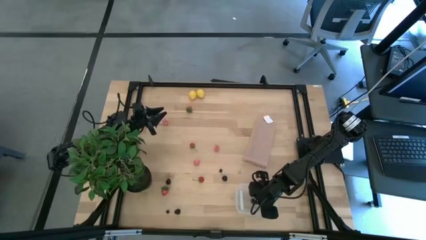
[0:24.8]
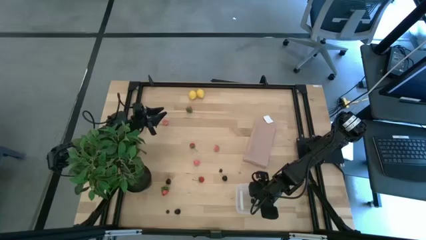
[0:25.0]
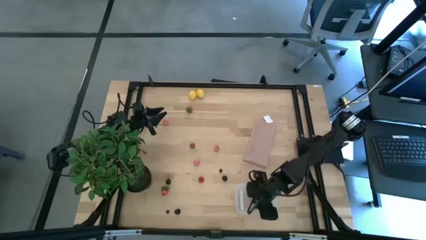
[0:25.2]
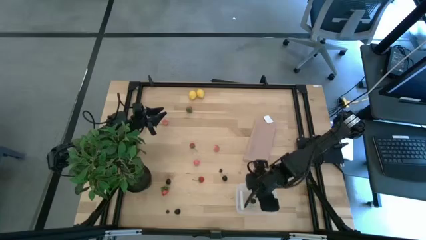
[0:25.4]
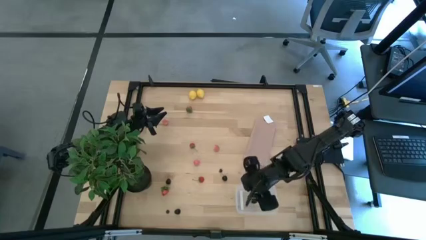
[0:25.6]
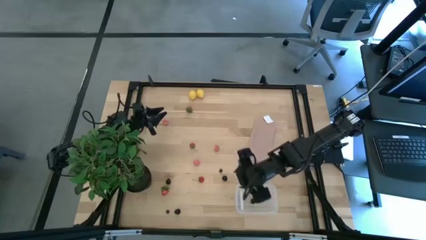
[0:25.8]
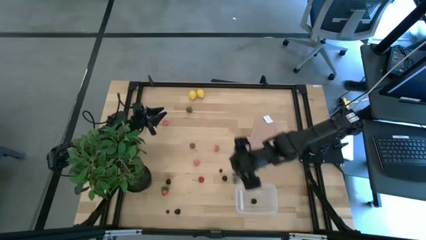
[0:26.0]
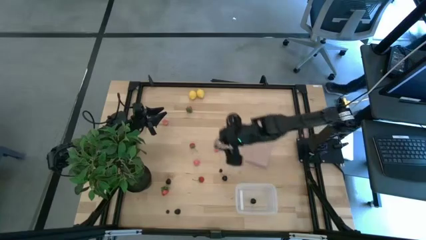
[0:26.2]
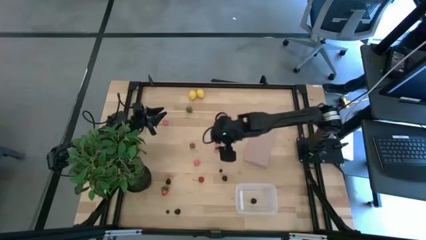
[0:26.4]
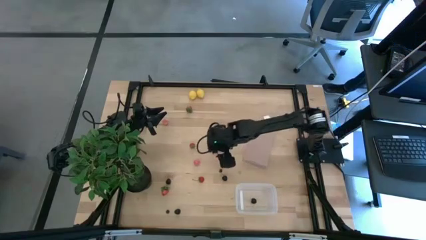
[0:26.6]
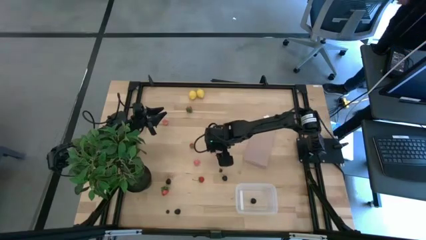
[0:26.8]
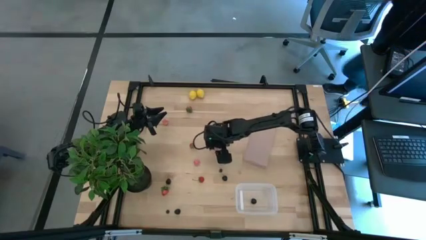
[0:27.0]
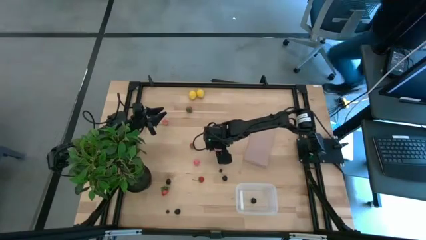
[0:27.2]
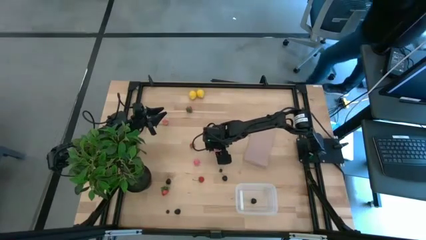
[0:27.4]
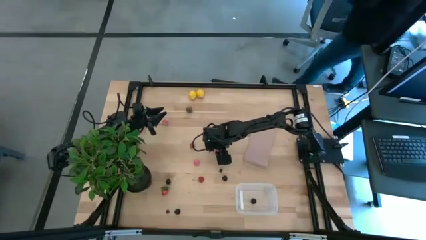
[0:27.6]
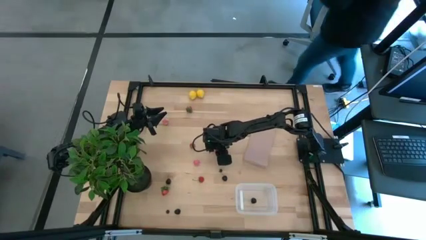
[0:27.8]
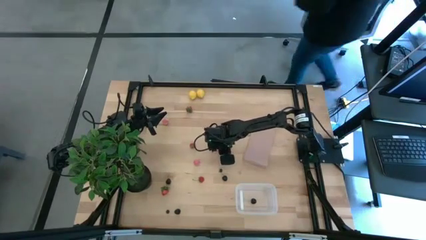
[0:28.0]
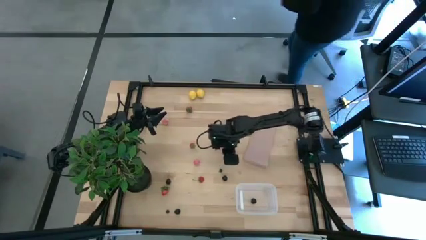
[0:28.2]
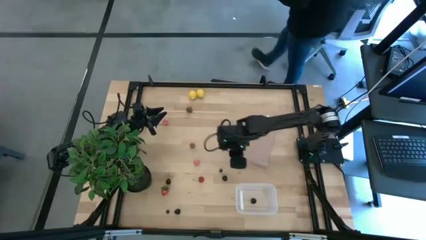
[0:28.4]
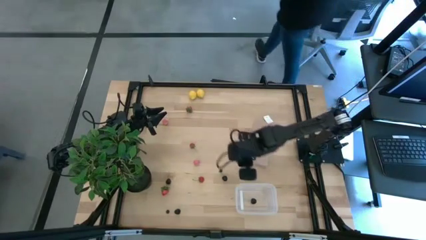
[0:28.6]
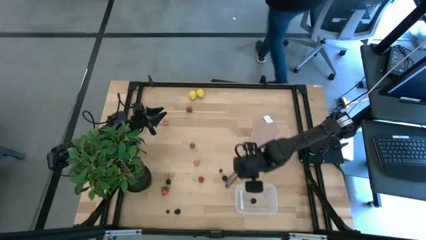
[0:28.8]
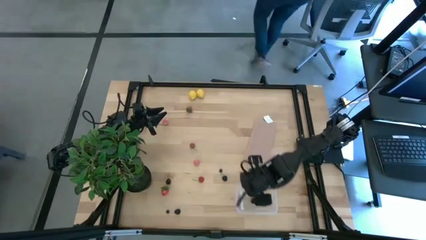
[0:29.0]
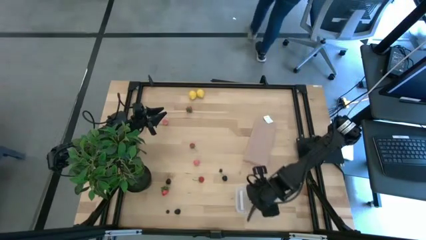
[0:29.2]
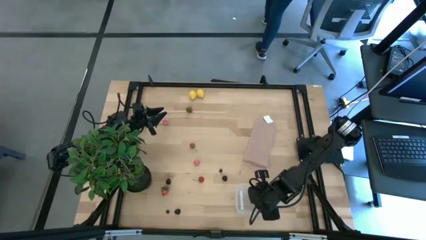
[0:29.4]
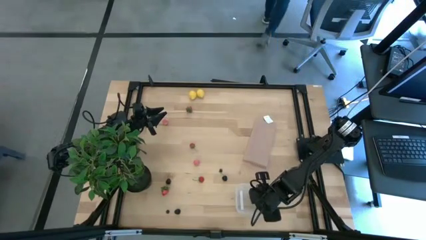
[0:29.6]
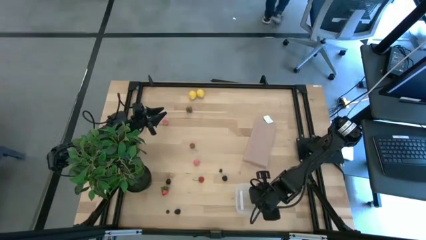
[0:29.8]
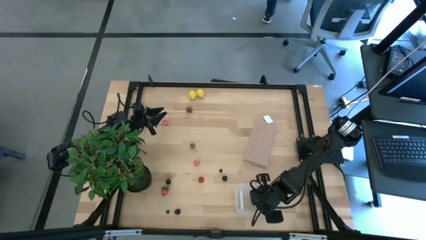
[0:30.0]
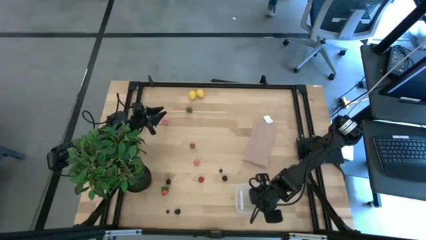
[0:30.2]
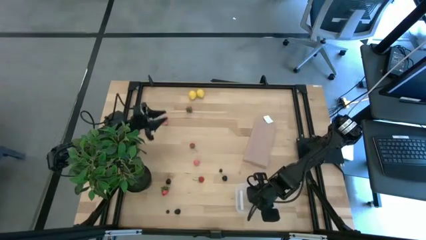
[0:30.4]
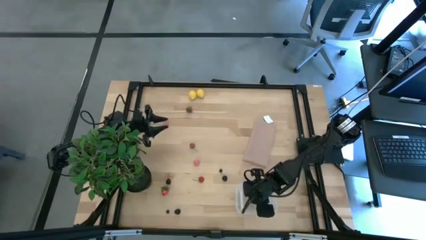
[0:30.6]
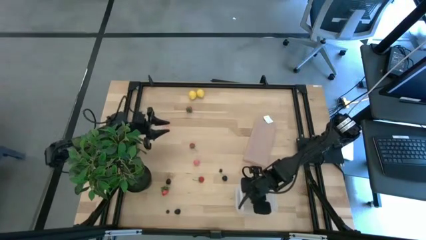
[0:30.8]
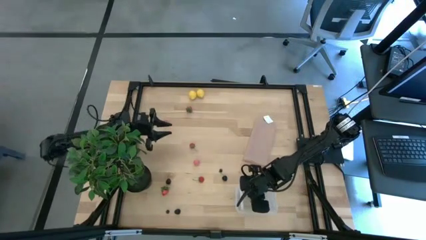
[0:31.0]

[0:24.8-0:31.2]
Task: Pick and placing Produce into tupperware
Put the peach into the transparent container

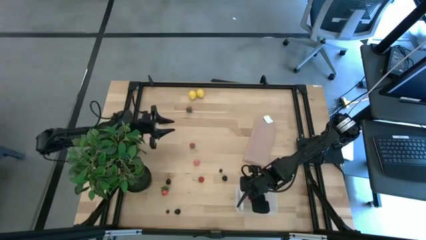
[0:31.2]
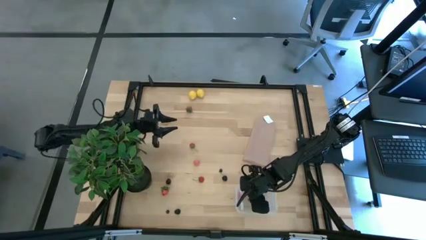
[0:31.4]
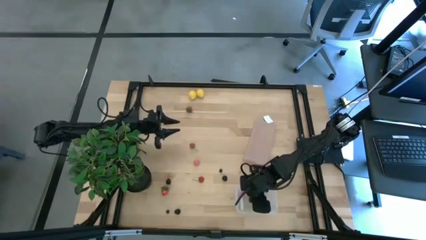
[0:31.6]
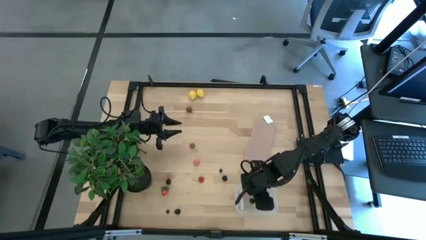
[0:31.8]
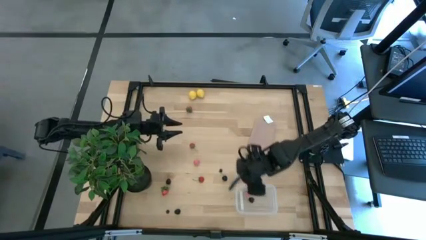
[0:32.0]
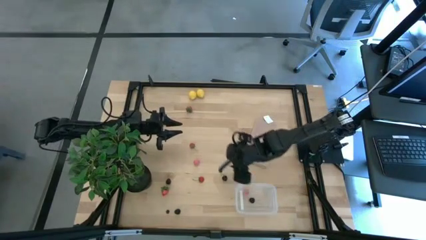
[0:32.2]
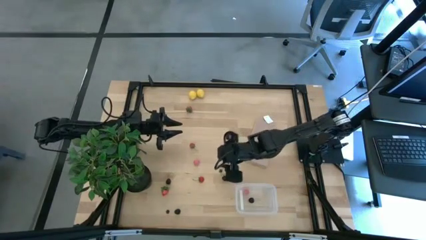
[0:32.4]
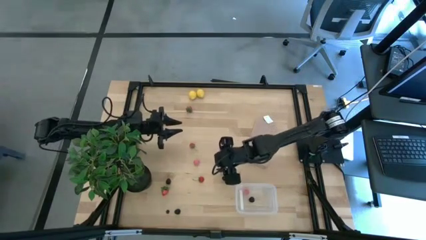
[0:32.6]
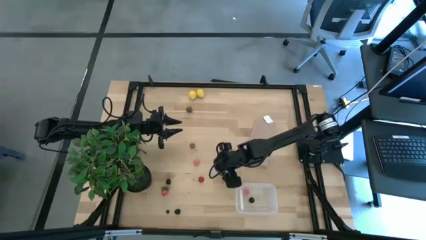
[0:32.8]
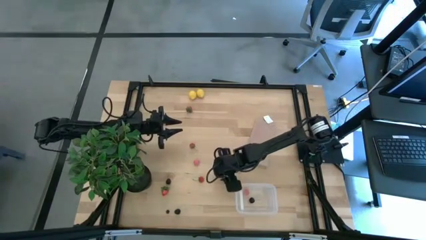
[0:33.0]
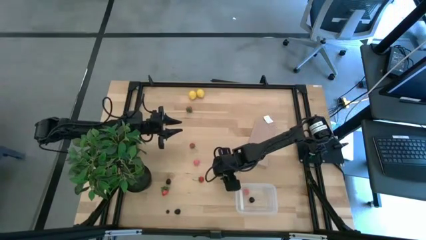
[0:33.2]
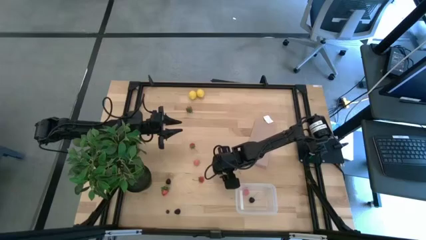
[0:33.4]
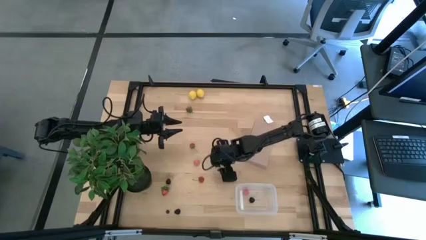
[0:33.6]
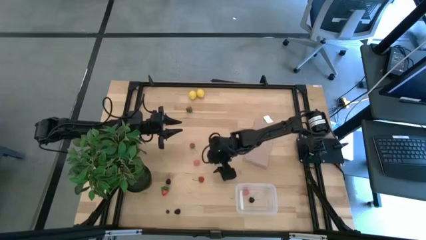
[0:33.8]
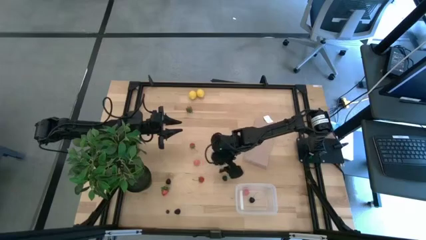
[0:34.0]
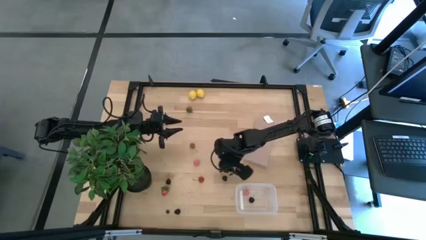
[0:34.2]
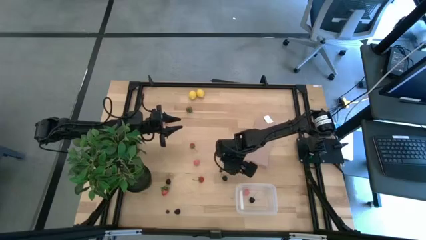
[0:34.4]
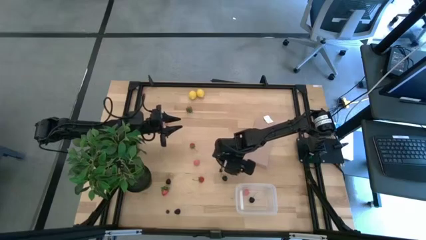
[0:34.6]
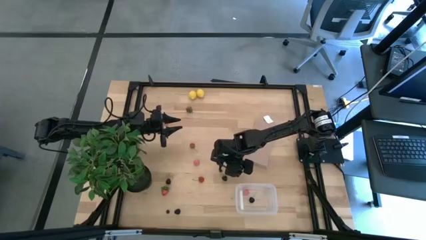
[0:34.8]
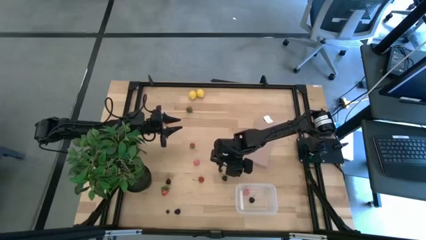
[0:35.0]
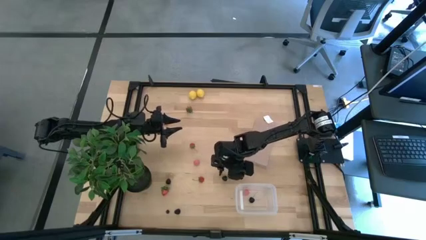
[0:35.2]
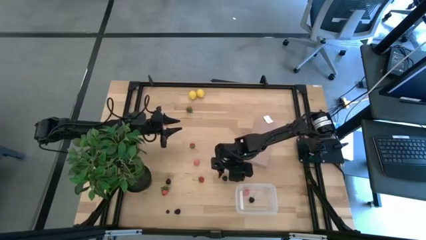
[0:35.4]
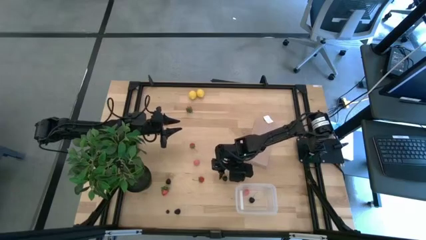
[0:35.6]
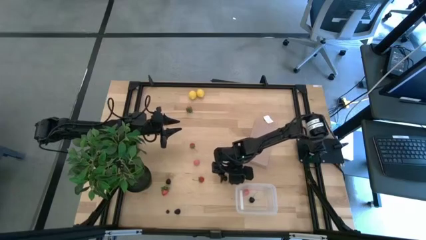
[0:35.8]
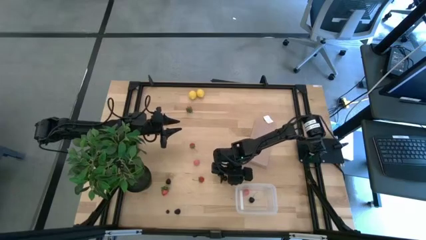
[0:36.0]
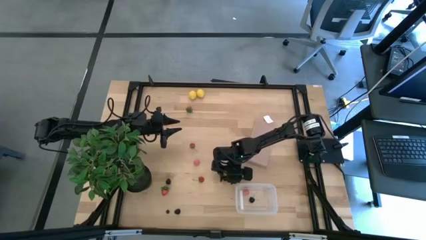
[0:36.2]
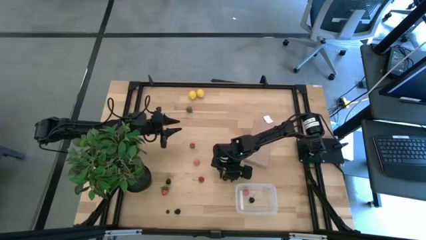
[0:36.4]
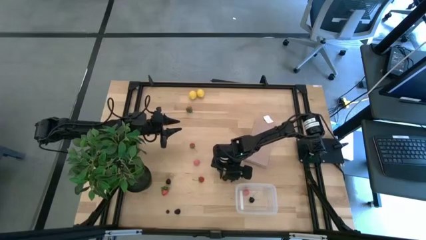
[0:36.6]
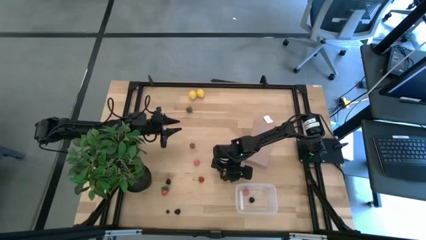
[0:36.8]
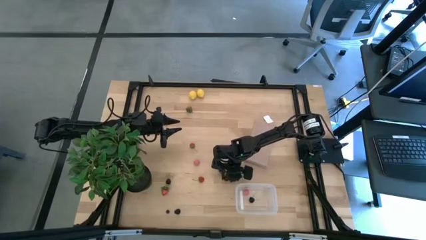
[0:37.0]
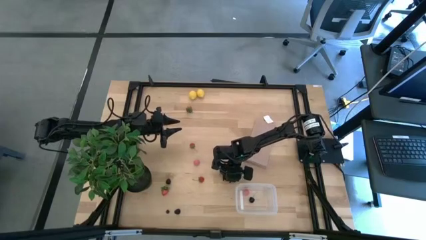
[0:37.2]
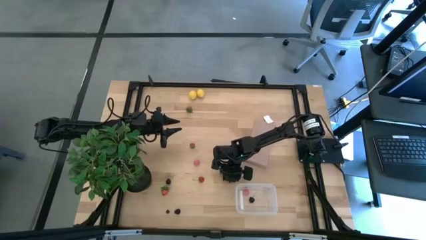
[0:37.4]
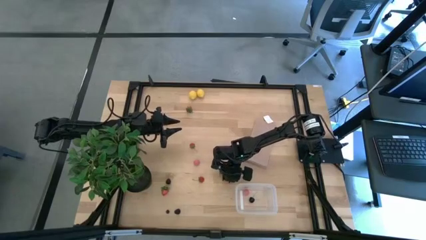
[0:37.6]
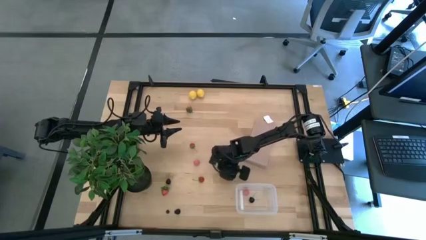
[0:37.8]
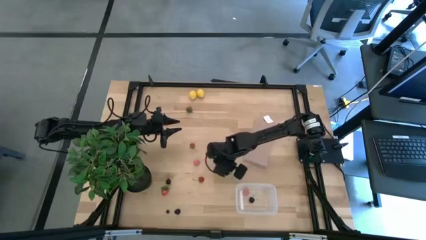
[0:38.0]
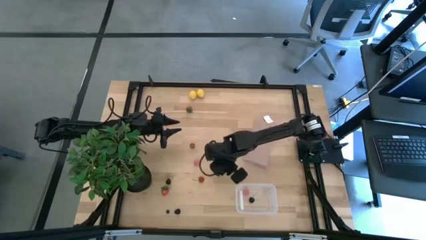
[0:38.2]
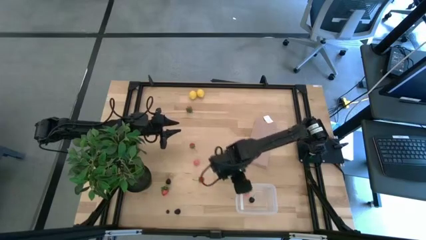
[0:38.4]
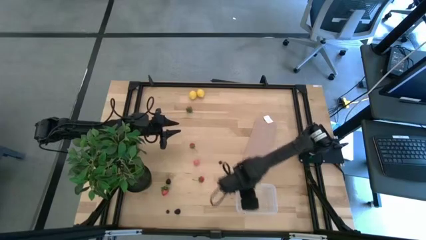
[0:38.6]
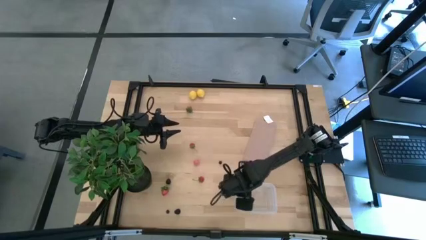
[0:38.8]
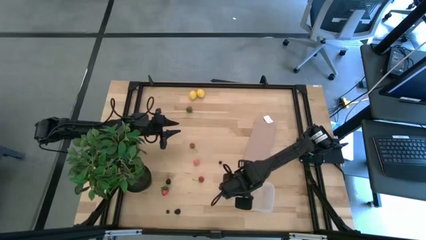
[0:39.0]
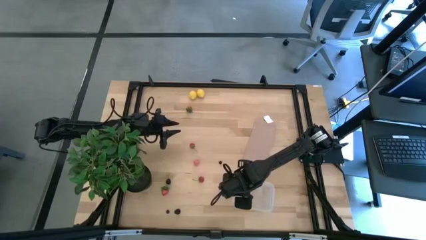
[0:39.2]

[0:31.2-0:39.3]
Put the cherry into the transparent container

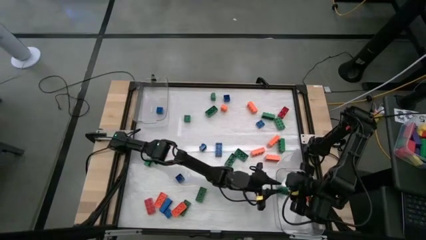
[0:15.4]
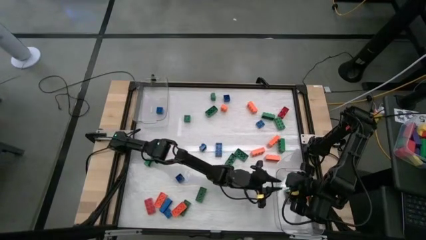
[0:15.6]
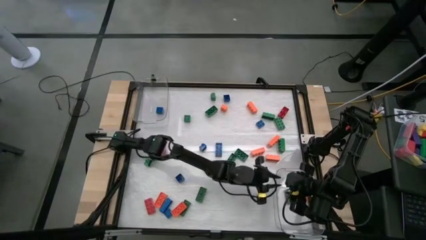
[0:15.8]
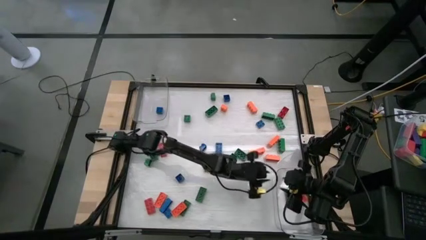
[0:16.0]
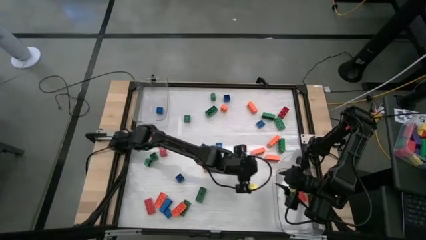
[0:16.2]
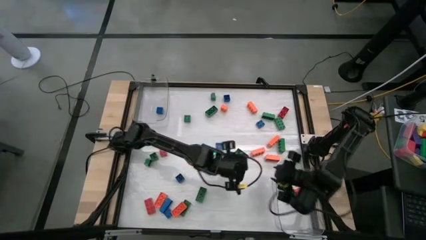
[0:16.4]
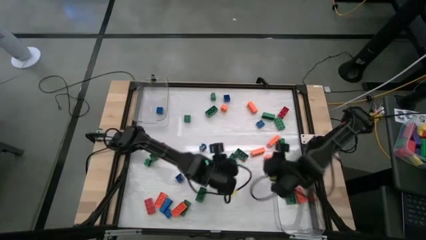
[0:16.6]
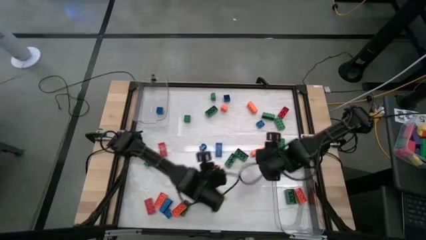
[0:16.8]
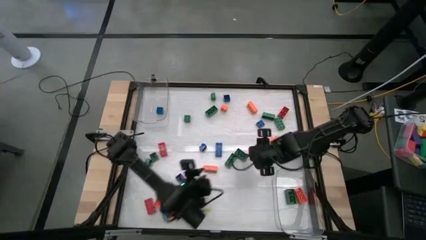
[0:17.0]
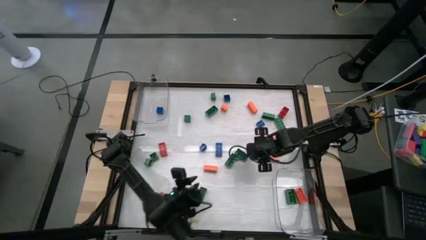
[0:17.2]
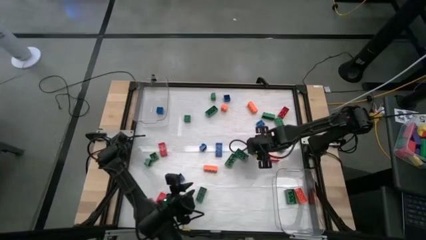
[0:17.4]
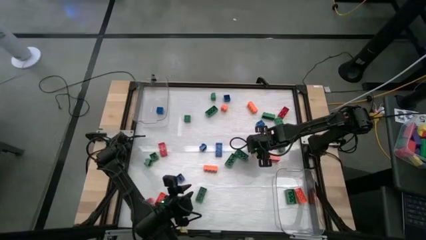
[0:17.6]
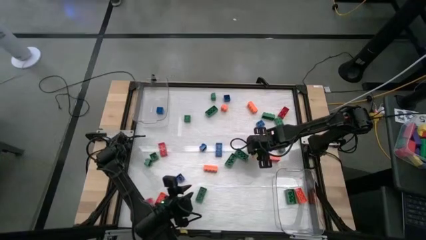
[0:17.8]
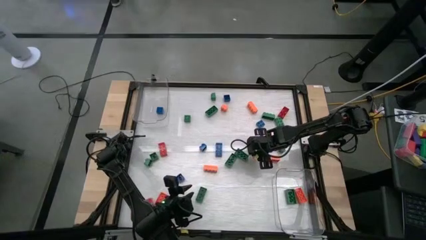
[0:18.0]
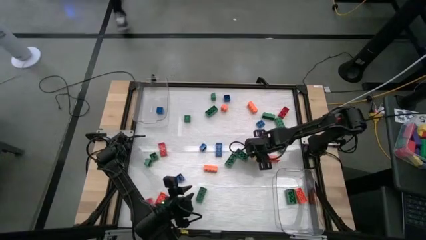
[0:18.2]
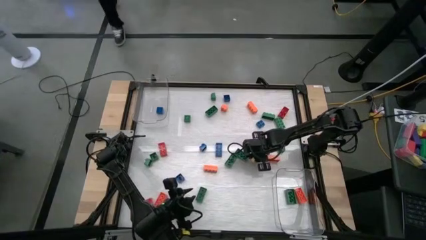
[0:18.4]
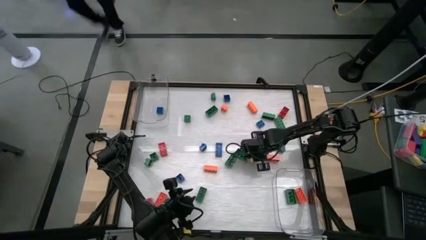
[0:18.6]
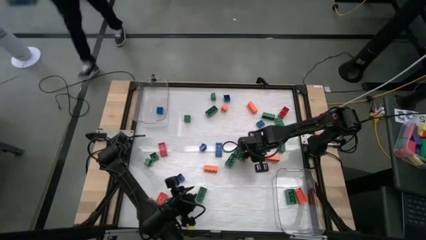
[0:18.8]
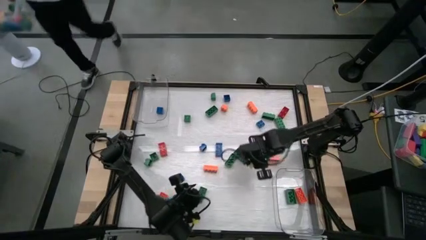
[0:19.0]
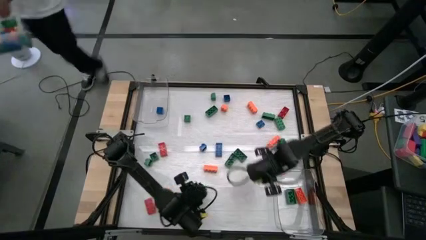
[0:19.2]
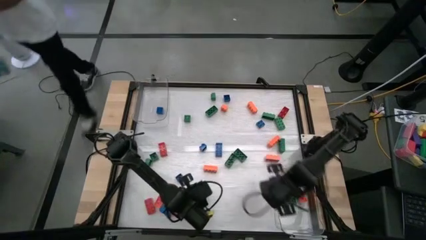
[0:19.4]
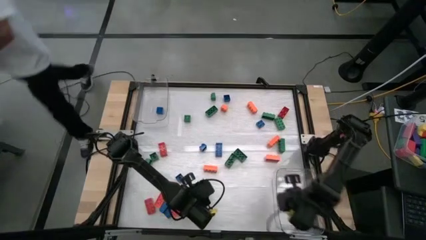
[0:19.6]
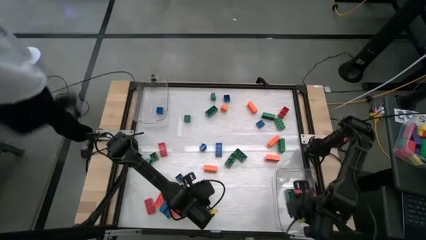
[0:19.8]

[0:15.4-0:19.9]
Task: Sort blocks by size
Put the 8 stud orange game piece into the bottom transparent bin
